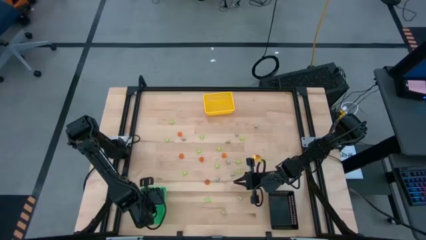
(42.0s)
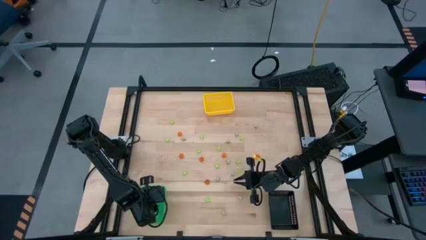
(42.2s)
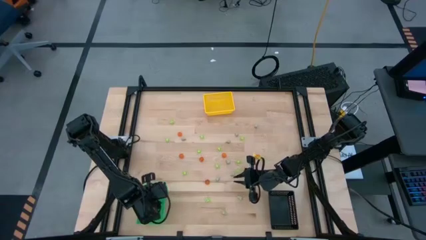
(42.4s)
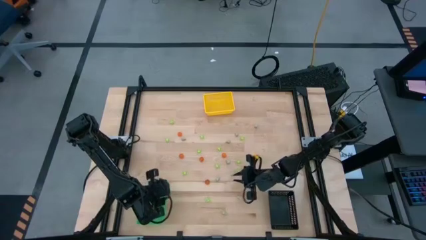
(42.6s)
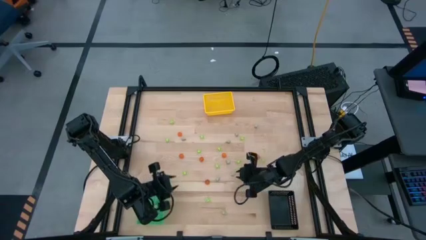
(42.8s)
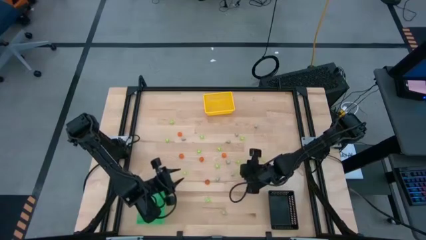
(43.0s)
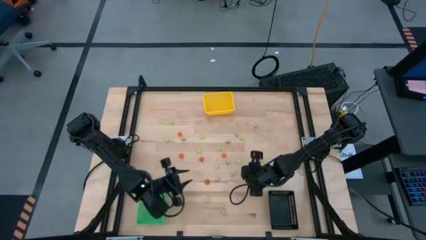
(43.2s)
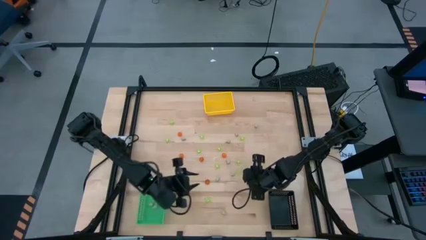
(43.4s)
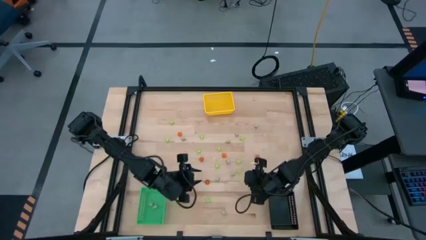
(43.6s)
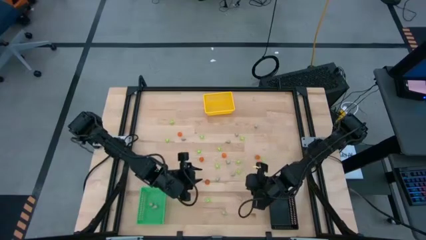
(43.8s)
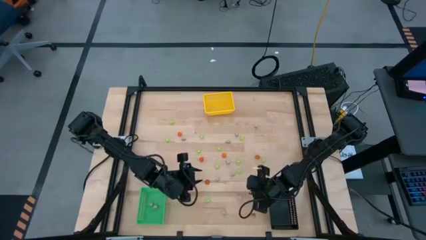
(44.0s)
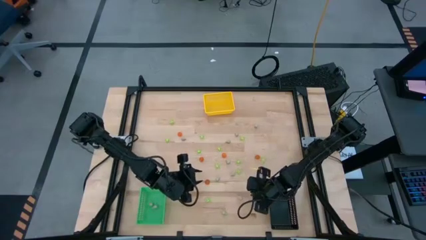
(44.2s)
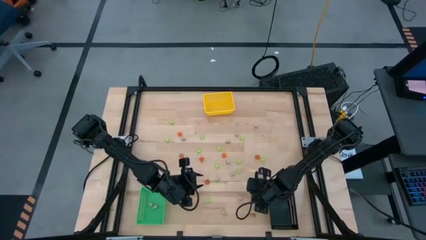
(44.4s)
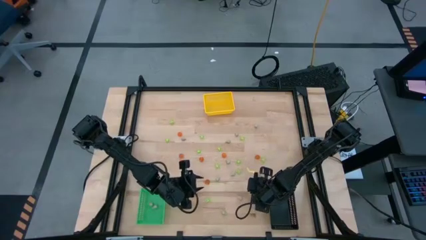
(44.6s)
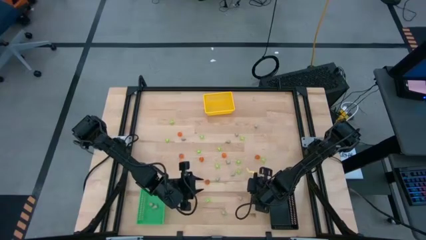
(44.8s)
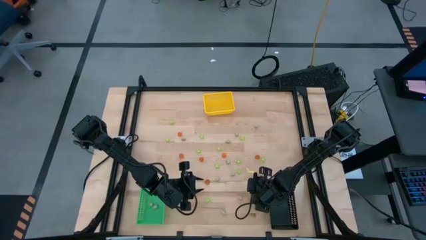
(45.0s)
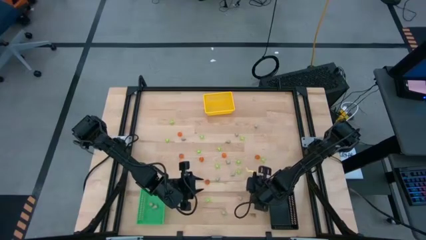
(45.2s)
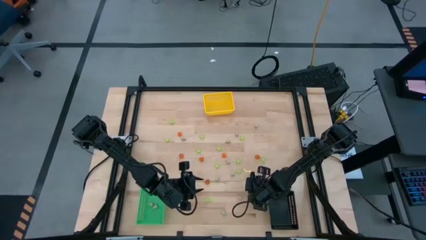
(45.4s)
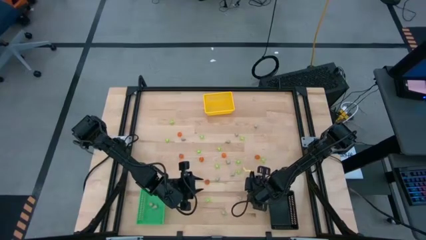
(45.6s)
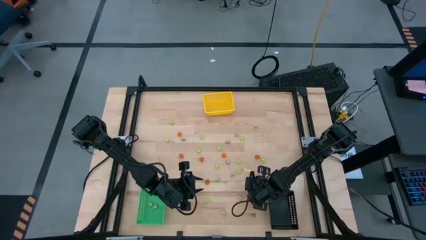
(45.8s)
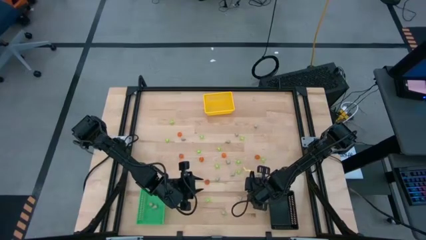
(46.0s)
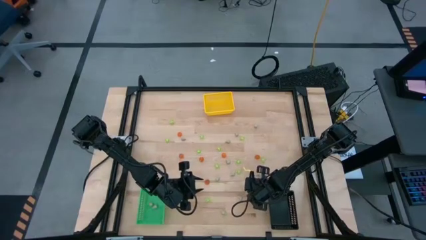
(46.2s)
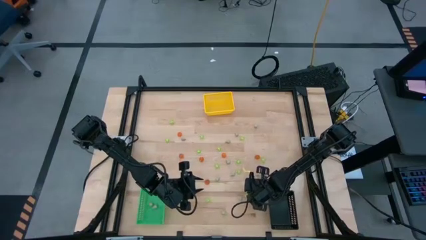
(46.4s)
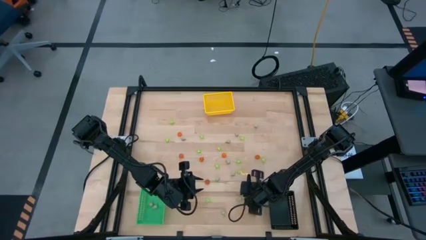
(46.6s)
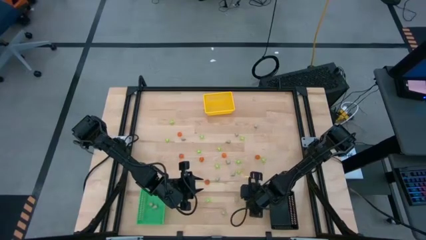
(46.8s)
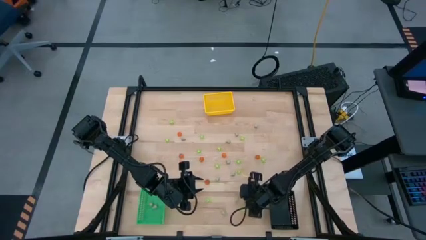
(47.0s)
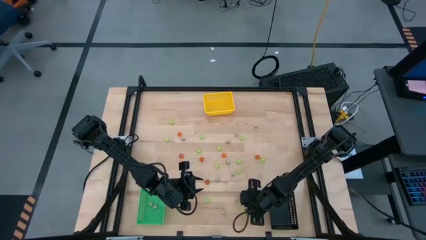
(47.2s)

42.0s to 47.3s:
Task: Sort Halloween decoration
Put the green spider toy into the yellow bin

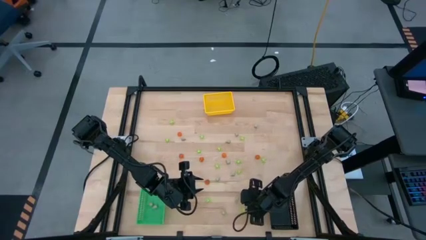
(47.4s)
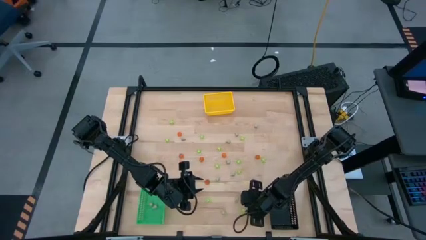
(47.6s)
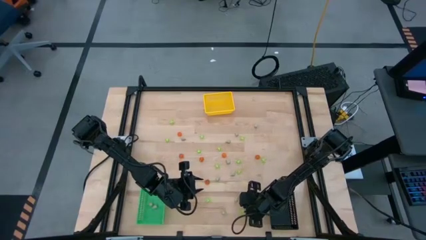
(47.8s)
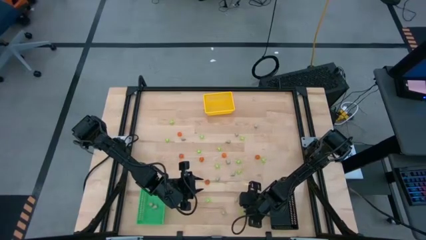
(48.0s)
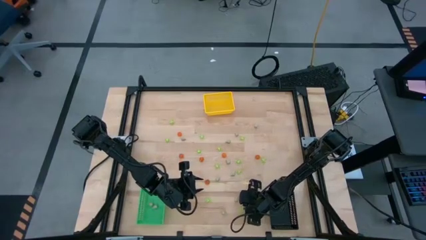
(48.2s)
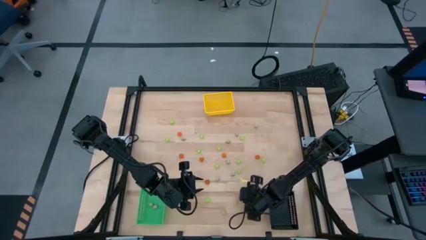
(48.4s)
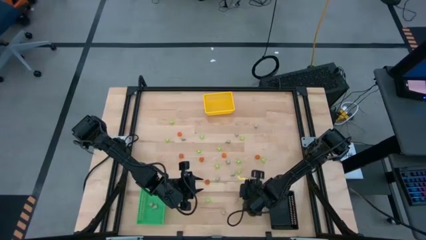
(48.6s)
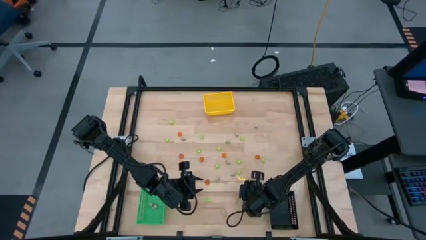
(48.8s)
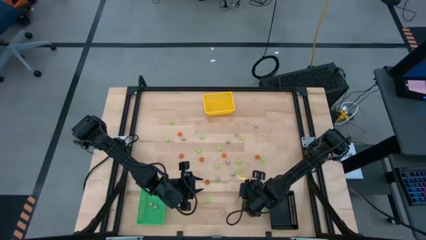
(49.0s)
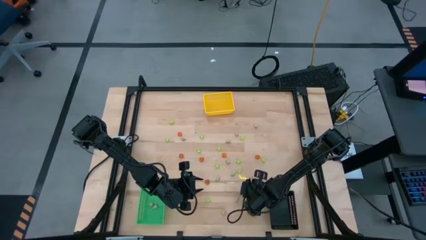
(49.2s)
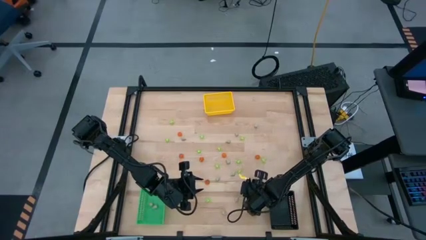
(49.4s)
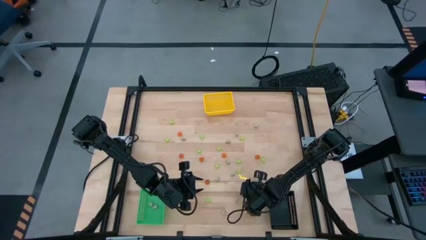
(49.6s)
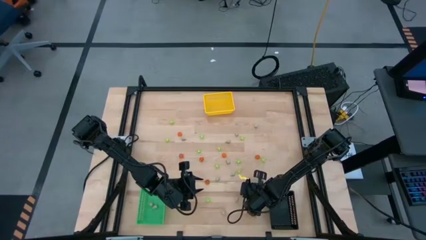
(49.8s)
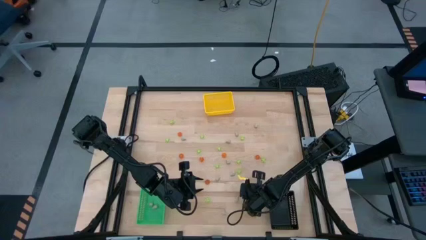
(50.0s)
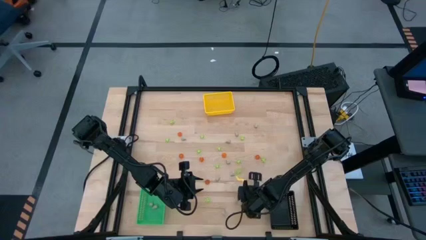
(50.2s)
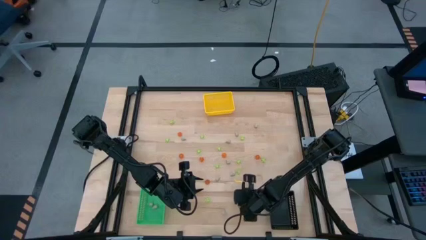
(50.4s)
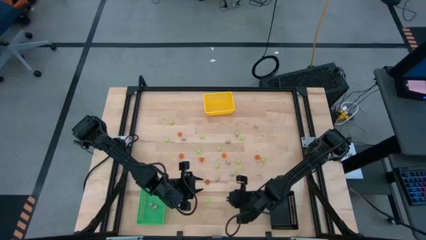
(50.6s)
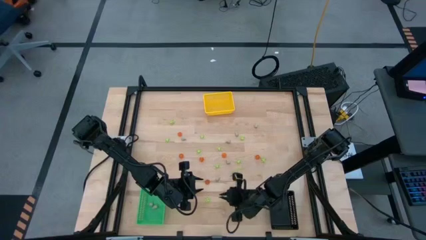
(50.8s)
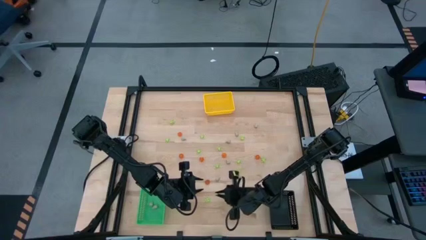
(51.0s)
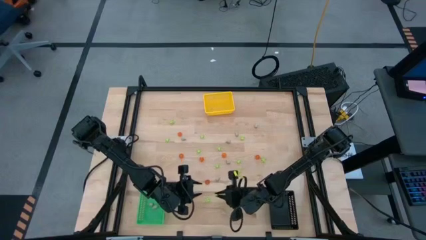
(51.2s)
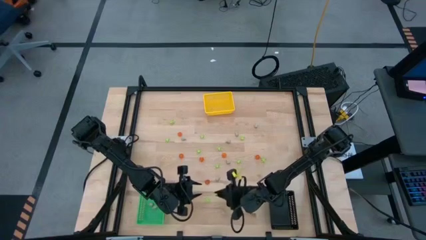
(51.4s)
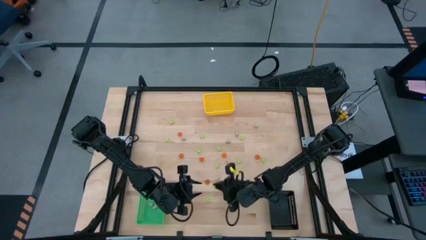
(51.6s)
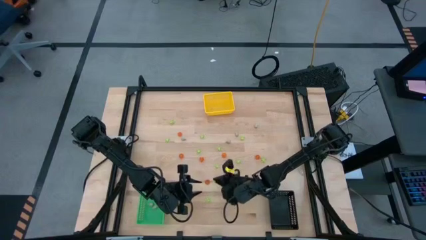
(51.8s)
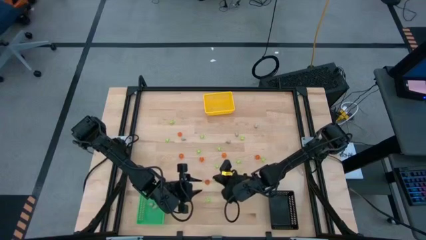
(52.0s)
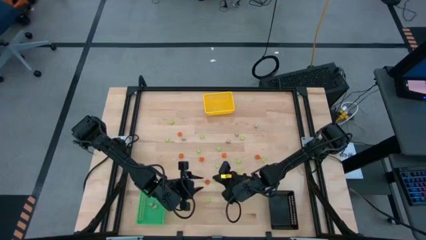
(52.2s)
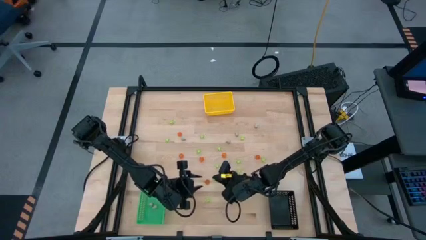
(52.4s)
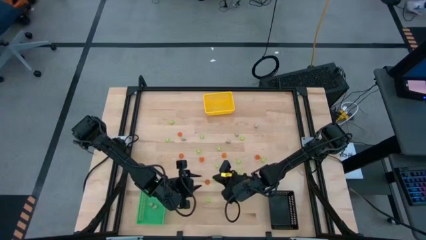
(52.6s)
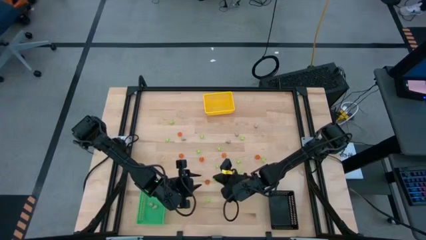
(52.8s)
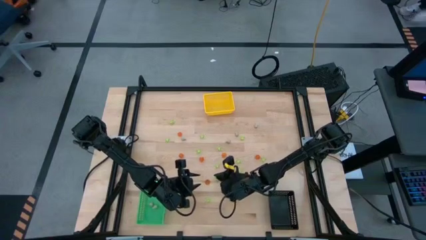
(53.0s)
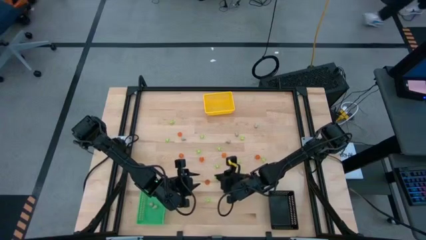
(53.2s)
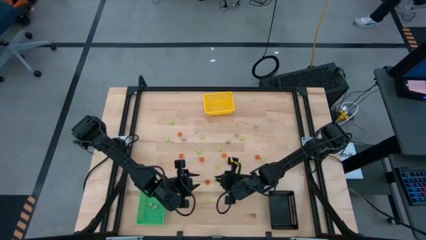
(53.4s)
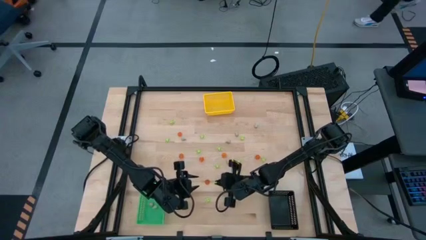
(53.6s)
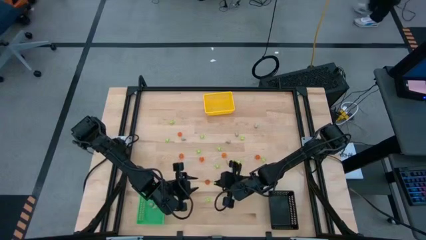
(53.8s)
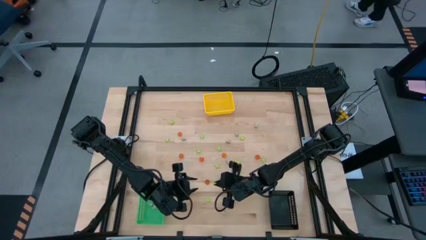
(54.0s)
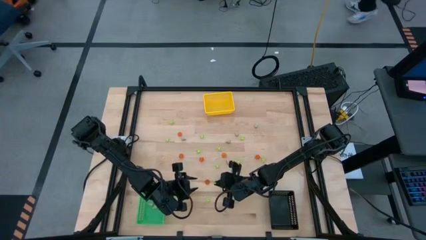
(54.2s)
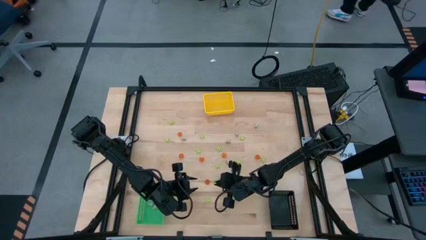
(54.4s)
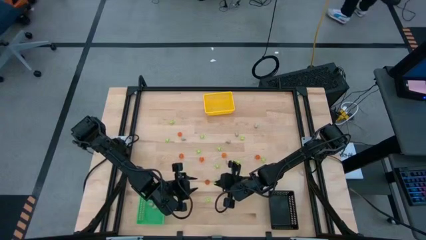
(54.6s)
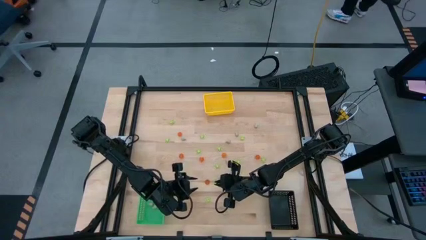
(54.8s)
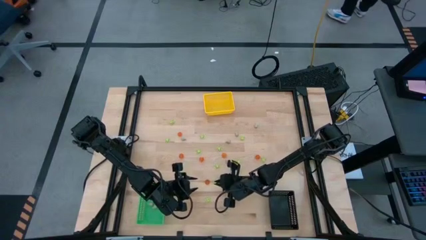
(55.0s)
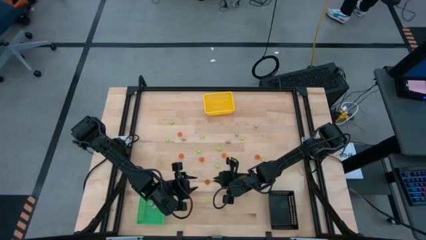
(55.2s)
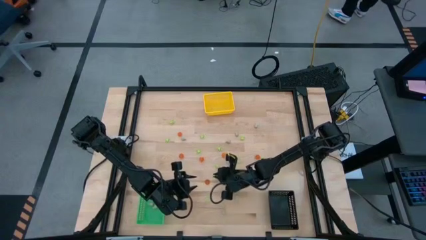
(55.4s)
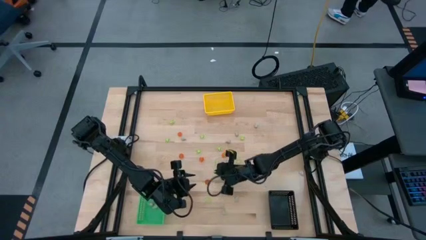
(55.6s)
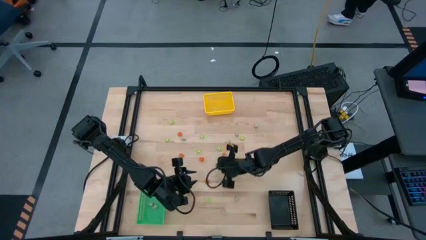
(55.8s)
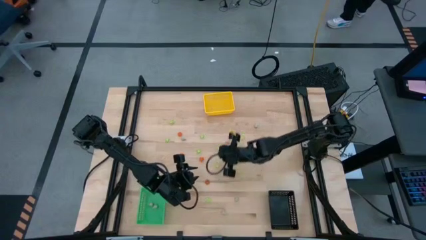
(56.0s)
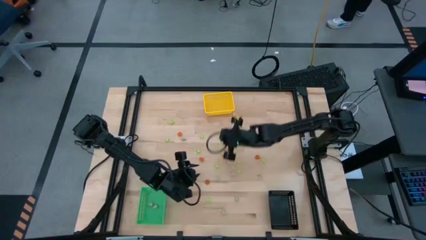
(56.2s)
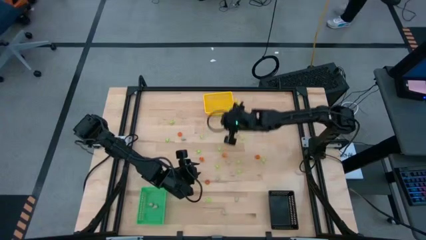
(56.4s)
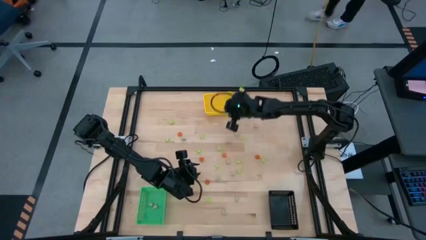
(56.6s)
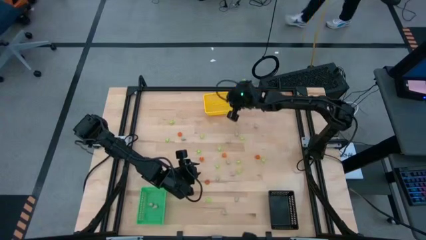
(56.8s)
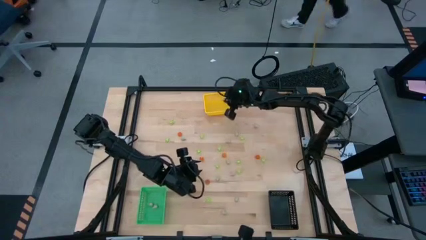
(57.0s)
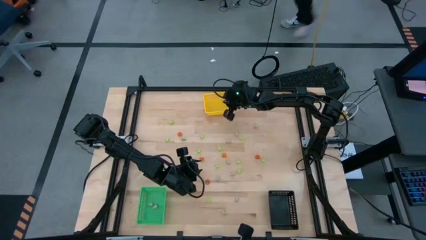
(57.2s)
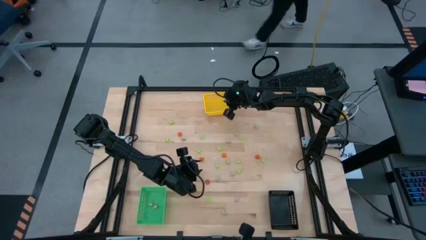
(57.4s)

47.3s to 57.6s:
Put the green spider toy into the yellow bin
